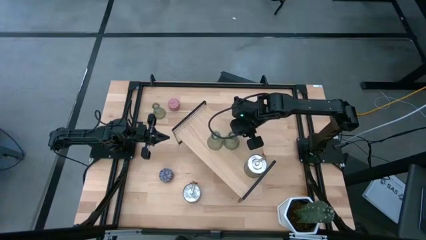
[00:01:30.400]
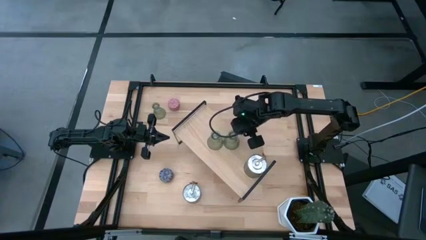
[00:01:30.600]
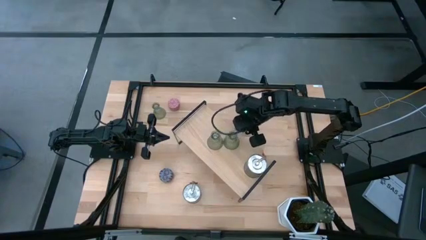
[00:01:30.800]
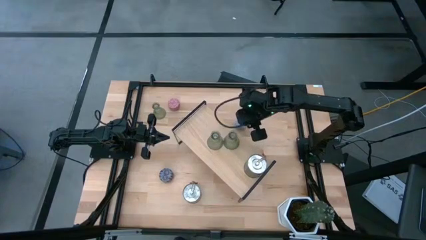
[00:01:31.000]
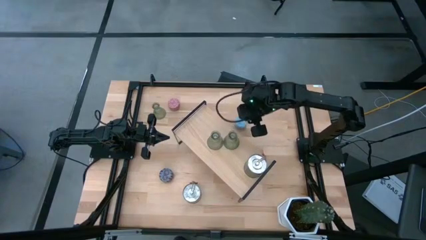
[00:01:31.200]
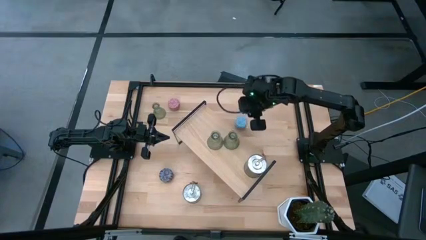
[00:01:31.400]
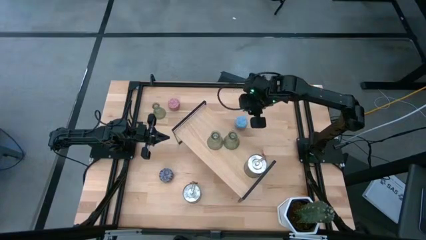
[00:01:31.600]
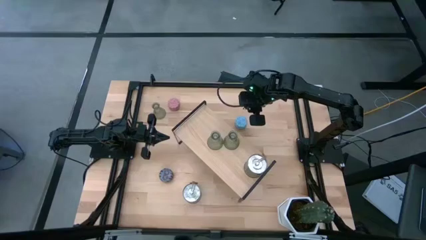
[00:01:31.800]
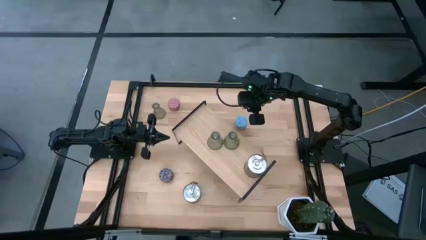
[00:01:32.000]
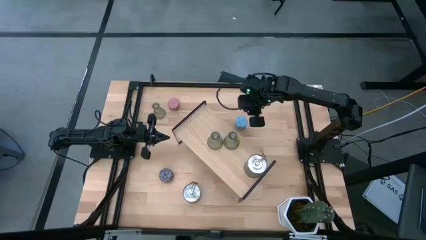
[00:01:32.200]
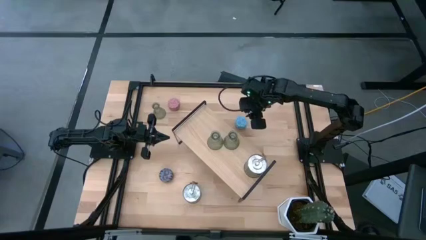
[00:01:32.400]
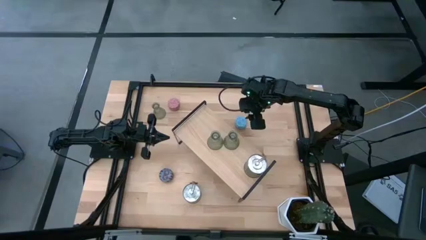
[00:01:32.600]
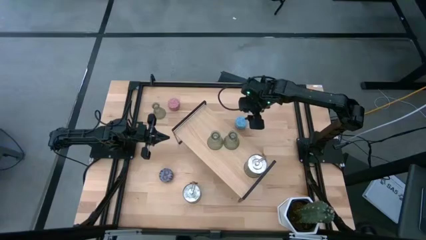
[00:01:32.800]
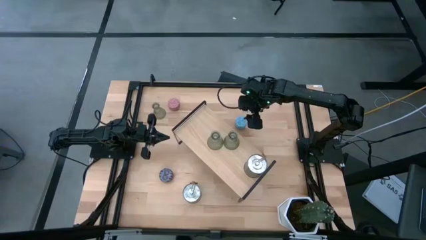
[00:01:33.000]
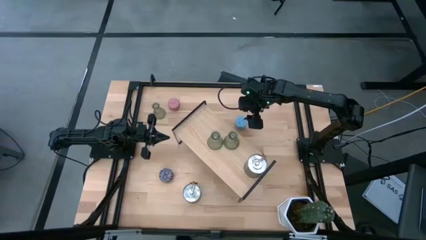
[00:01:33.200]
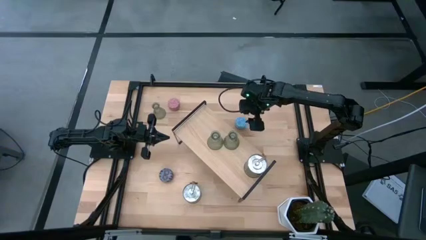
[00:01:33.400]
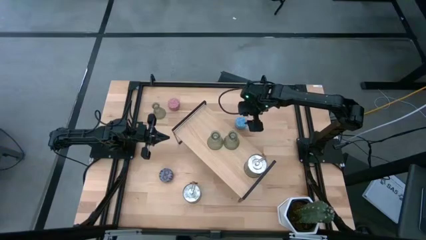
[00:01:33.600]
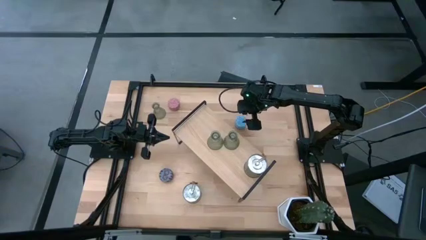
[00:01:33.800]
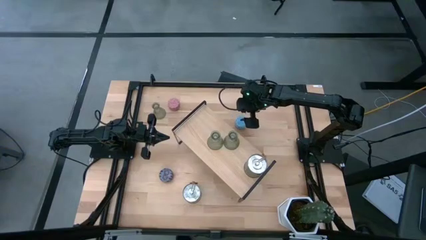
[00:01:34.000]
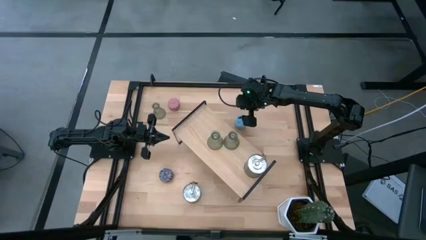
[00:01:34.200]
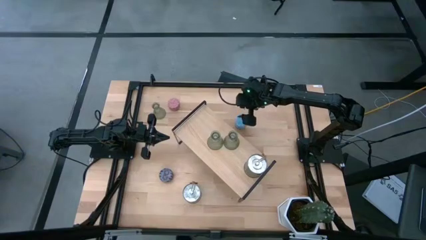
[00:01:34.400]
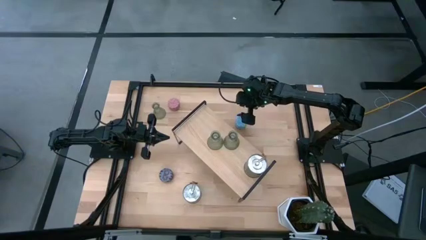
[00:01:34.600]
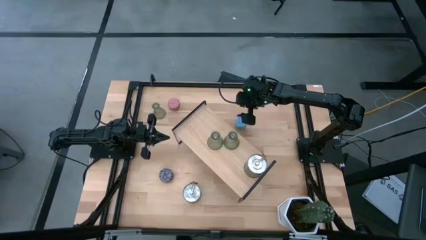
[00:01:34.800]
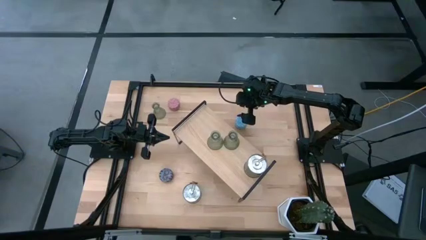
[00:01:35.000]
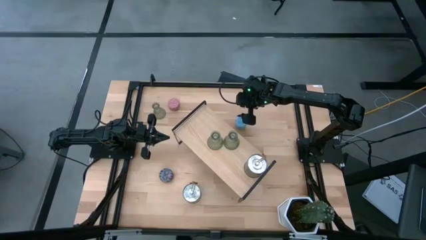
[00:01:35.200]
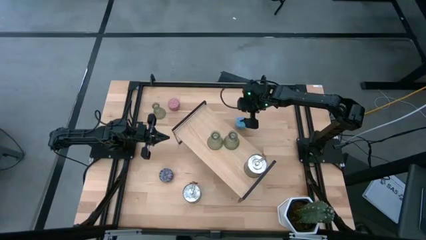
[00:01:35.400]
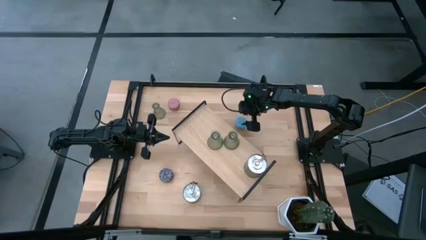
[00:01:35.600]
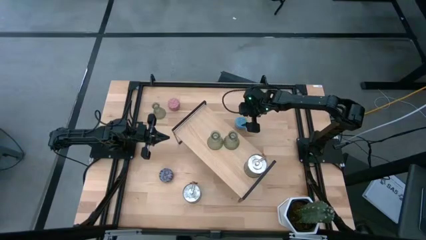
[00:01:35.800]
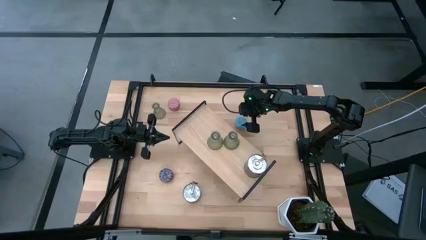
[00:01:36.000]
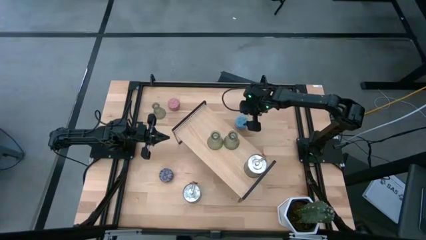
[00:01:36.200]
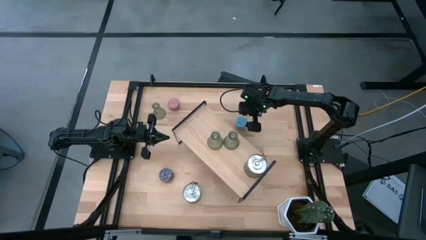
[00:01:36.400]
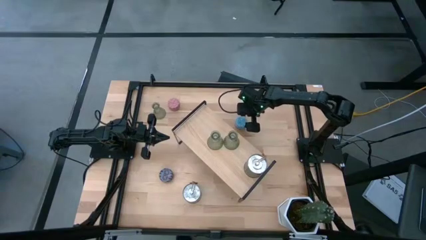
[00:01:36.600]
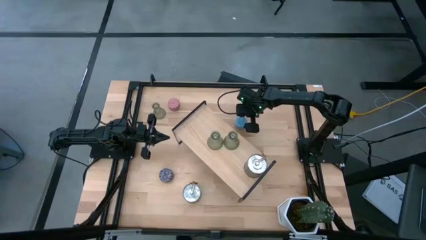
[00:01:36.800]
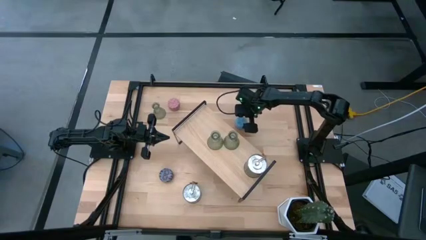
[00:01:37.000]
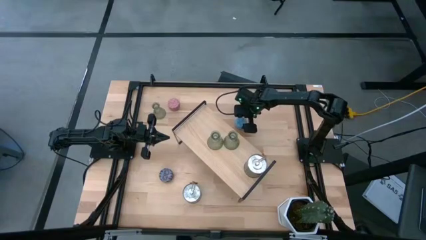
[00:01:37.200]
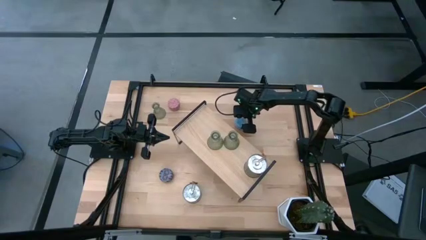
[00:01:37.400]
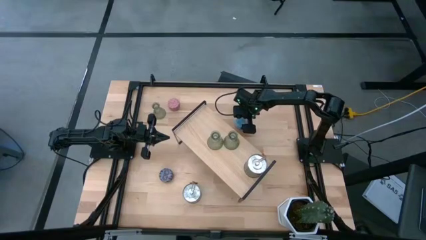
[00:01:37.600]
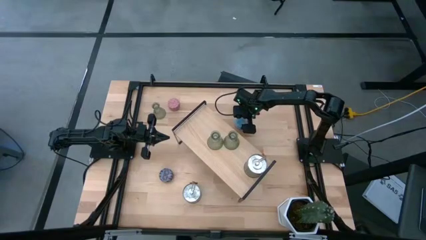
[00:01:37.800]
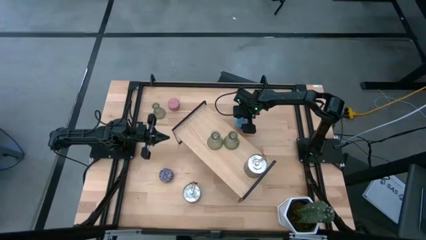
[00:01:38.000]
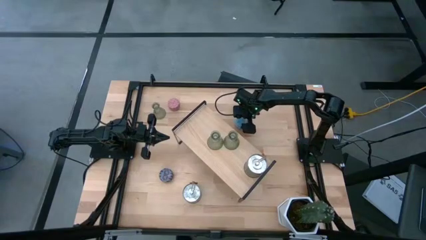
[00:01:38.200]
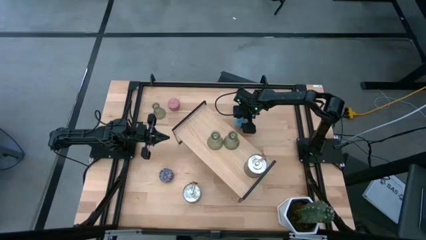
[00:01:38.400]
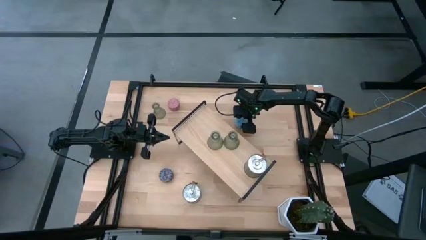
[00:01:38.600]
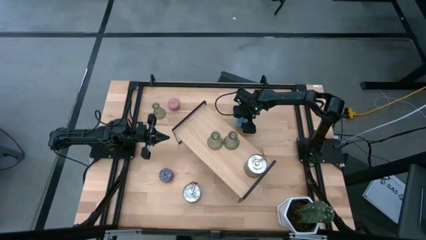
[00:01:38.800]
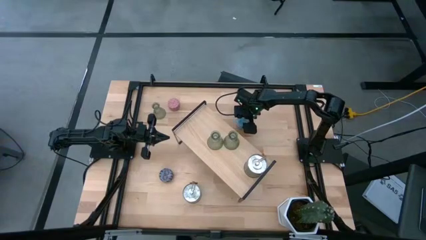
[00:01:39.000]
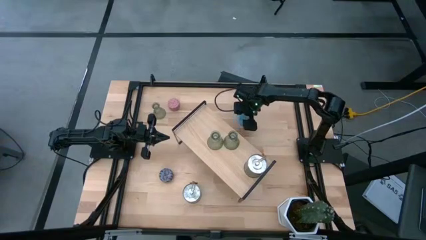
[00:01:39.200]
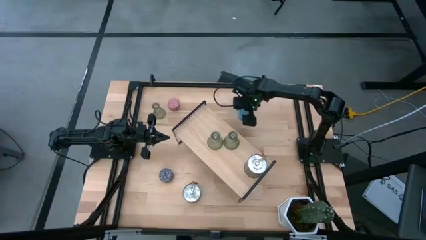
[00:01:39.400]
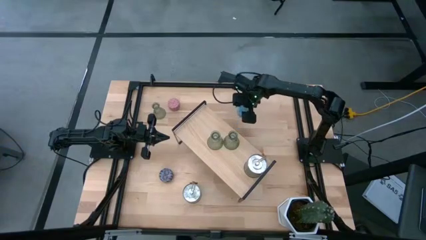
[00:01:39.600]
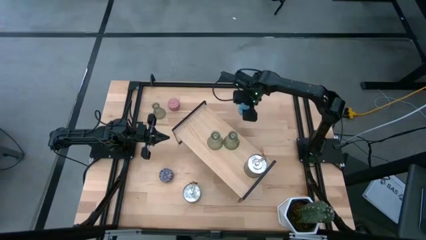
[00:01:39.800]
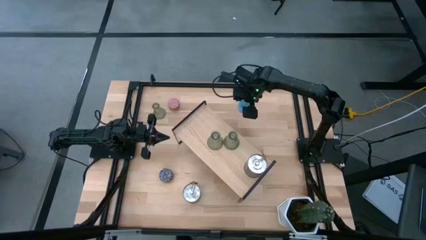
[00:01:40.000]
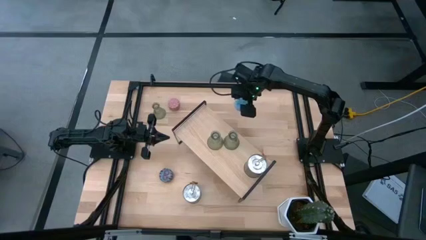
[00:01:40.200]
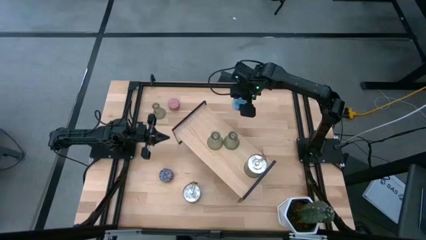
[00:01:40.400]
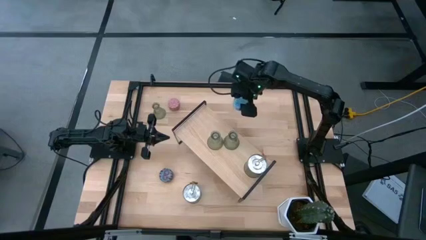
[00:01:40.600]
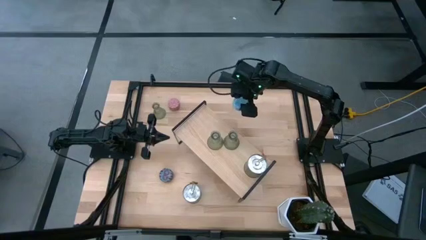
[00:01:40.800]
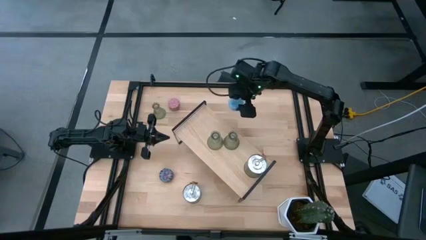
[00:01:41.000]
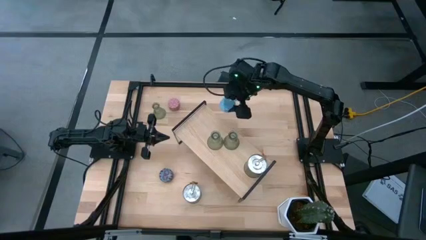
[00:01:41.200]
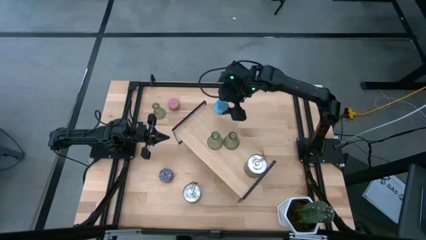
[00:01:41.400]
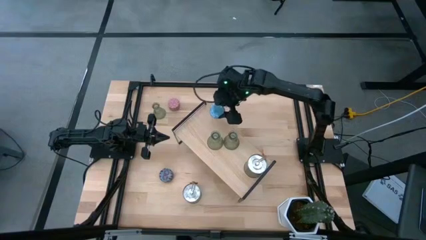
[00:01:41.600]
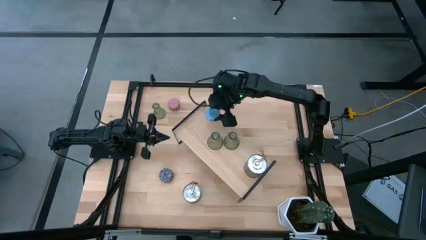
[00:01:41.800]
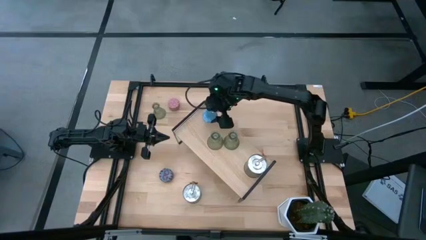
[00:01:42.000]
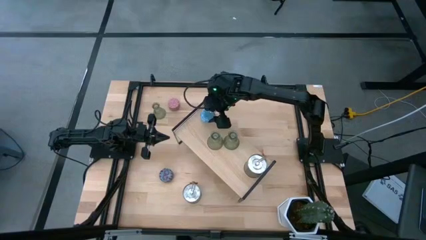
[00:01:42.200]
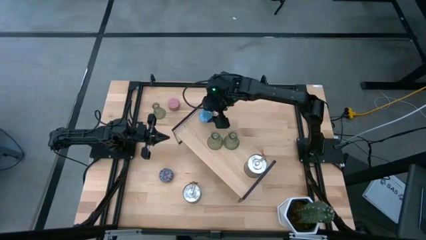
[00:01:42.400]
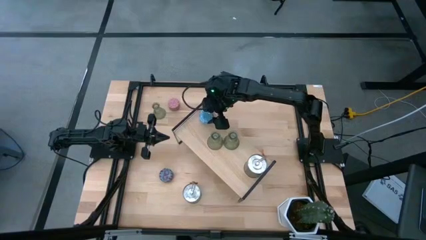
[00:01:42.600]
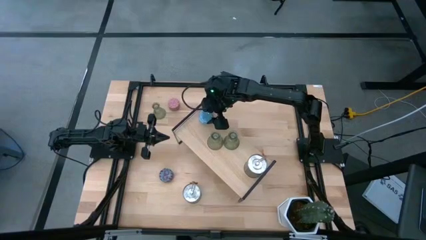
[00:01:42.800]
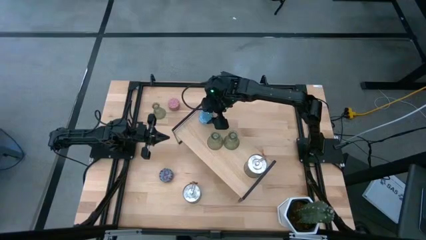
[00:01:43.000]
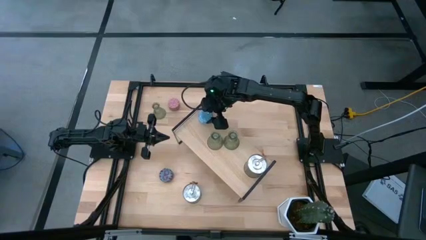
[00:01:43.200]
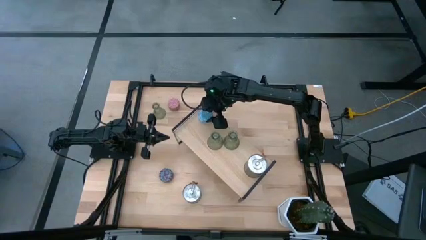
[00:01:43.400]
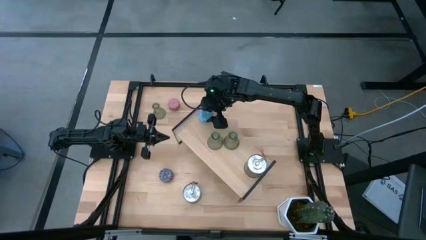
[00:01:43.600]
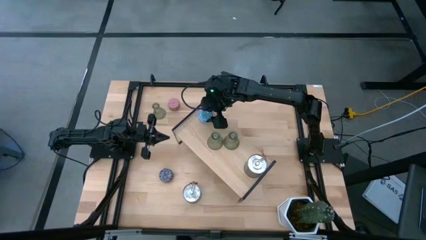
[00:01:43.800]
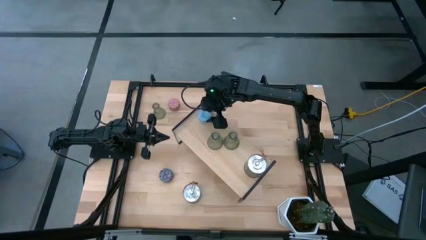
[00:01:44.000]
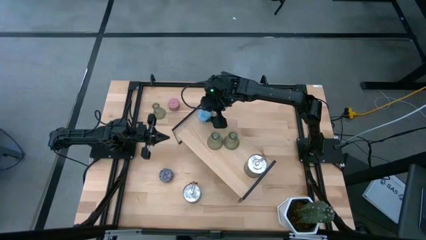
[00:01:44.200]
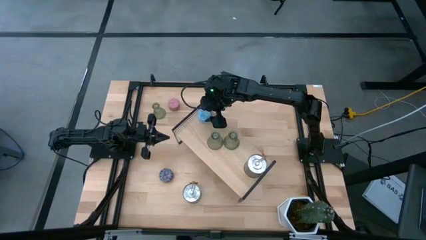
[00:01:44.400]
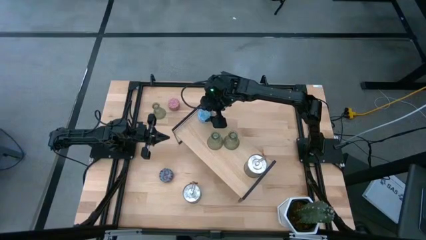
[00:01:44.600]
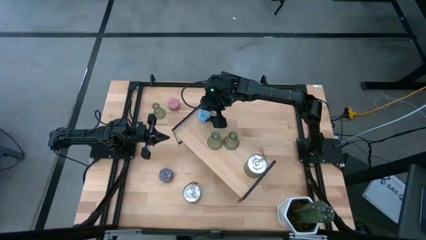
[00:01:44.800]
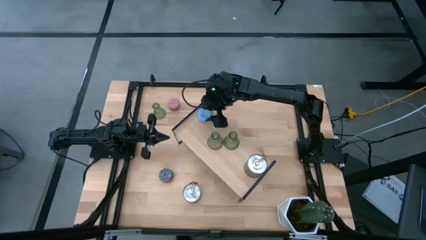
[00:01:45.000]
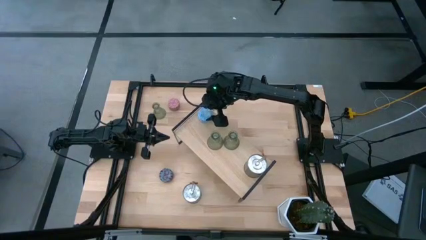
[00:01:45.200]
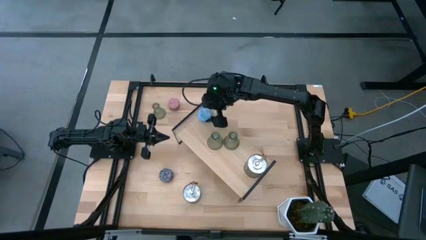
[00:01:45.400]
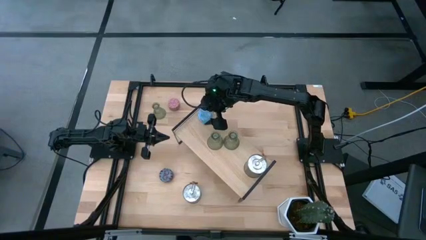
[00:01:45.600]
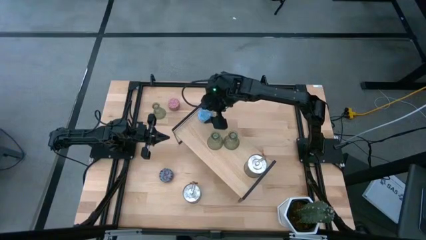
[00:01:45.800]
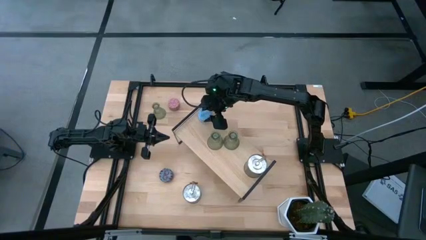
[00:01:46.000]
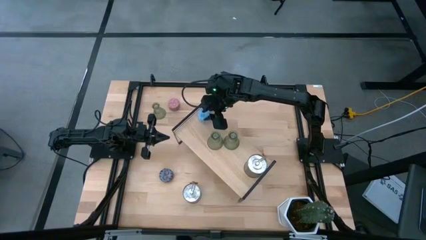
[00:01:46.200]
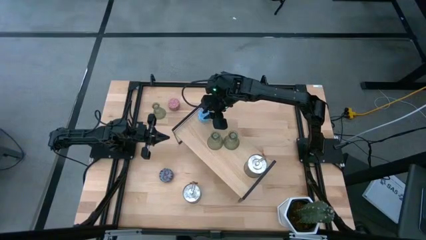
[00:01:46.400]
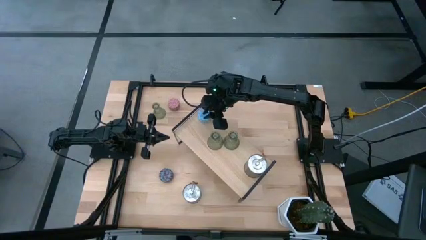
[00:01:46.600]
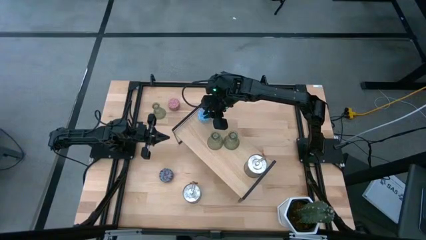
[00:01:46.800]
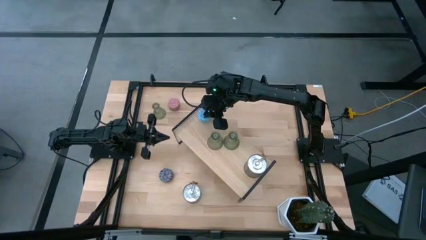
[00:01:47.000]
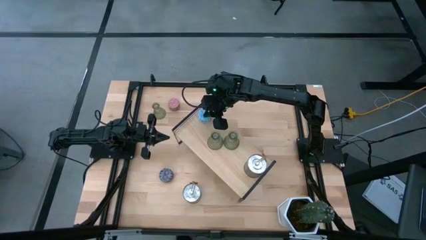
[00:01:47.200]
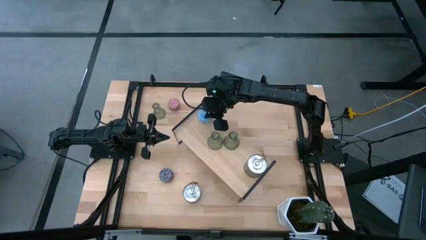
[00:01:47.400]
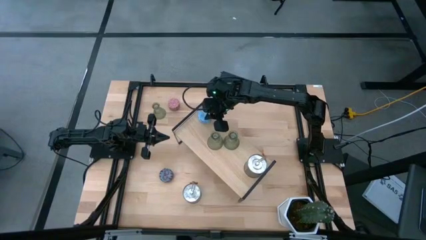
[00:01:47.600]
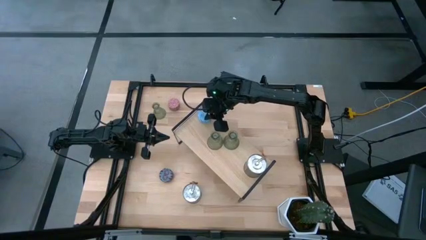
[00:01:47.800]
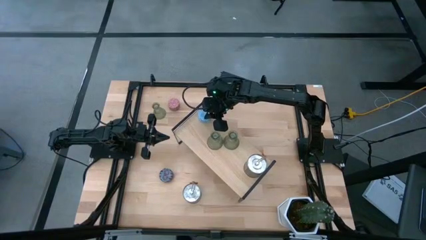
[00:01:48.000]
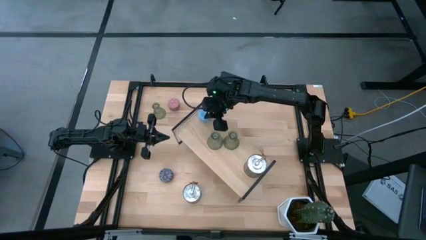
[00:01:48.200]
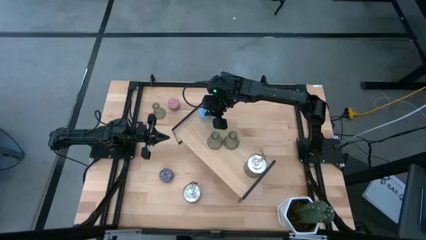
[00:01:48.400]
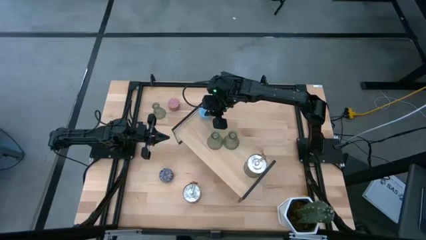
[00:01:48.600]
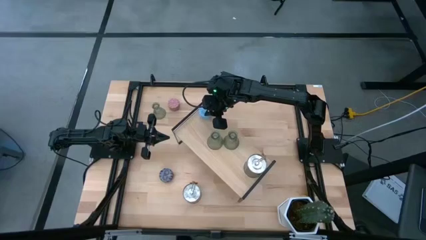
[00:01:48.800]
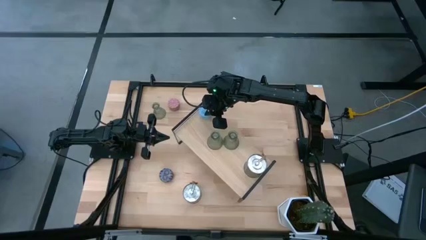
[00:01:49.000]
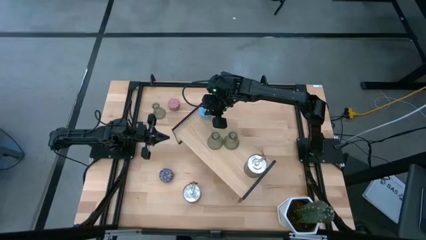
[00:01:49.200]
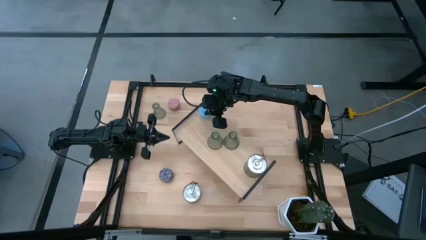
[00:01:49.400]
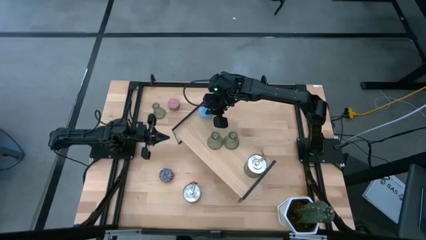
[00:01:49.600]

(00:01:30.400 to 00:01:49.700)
Task: Pick & Place candle stick holders
Put the blue white scented candle on the shelf
